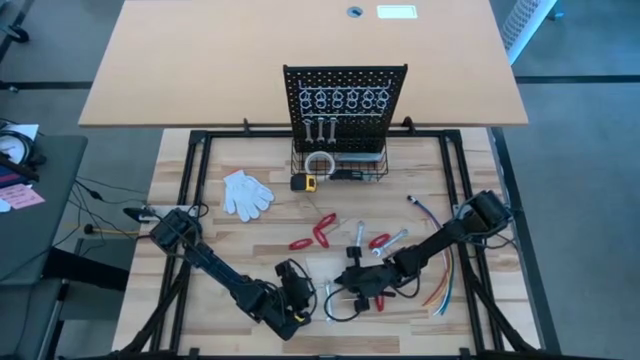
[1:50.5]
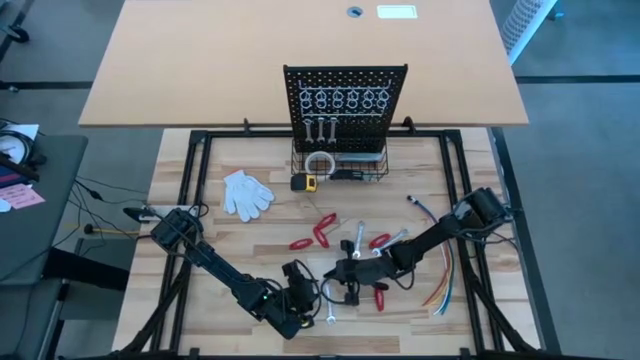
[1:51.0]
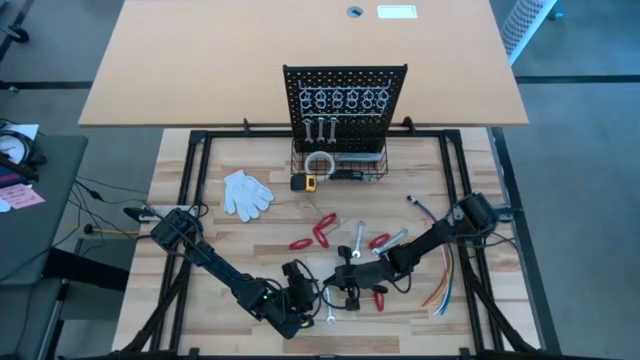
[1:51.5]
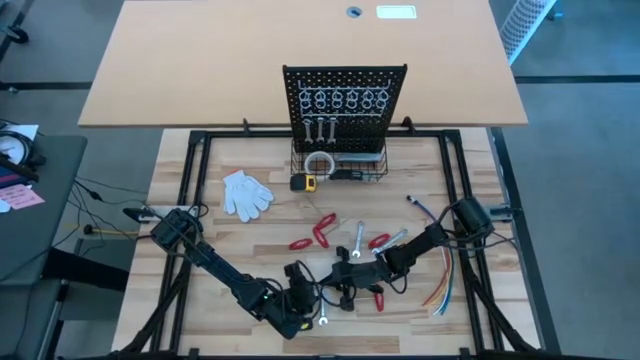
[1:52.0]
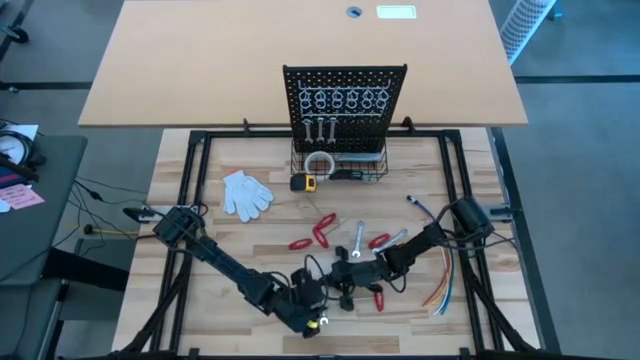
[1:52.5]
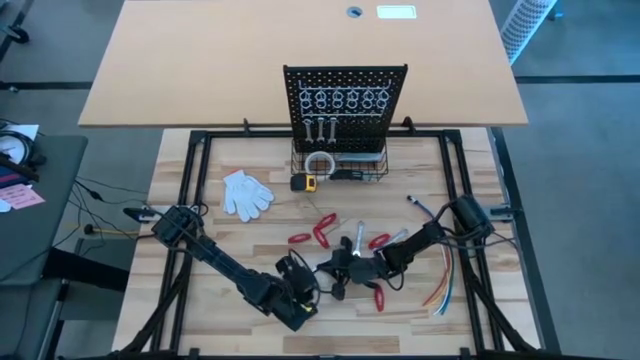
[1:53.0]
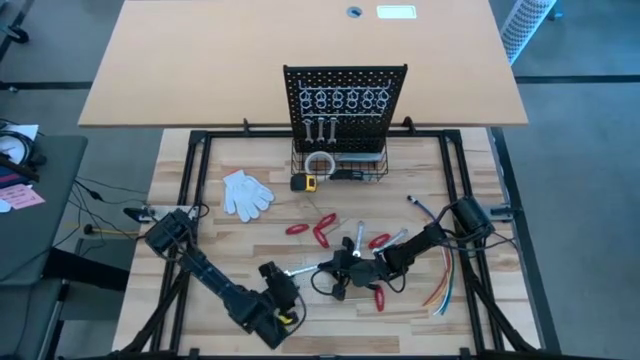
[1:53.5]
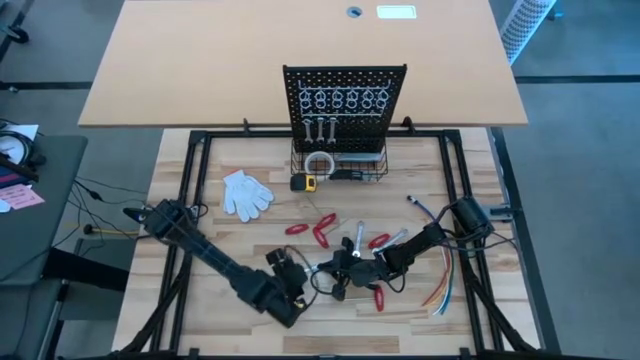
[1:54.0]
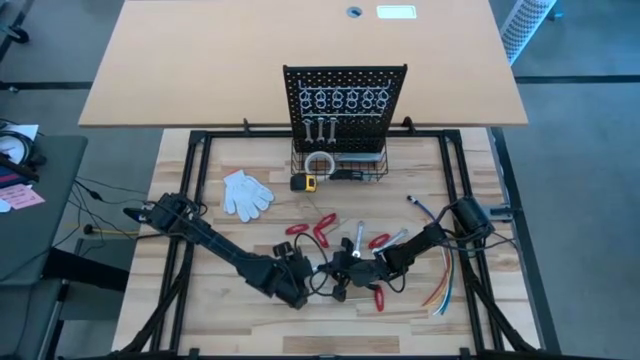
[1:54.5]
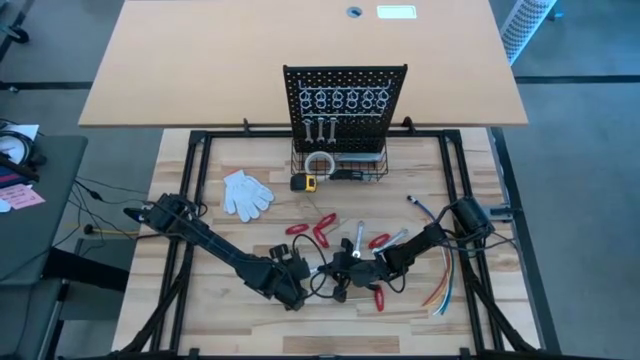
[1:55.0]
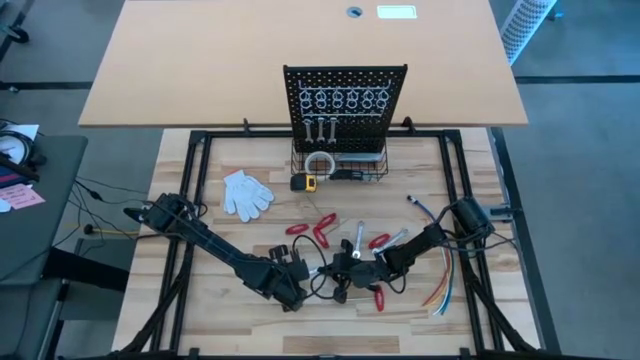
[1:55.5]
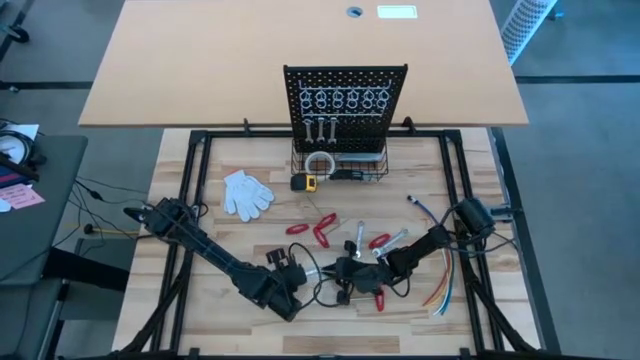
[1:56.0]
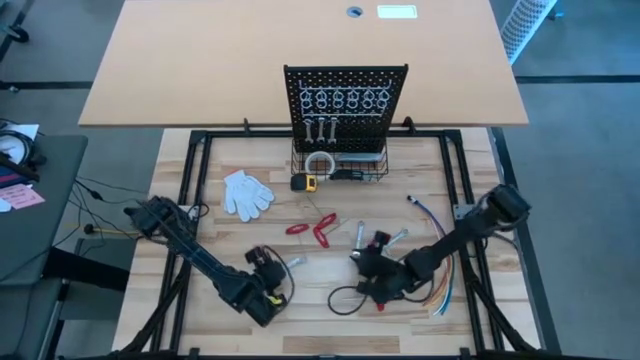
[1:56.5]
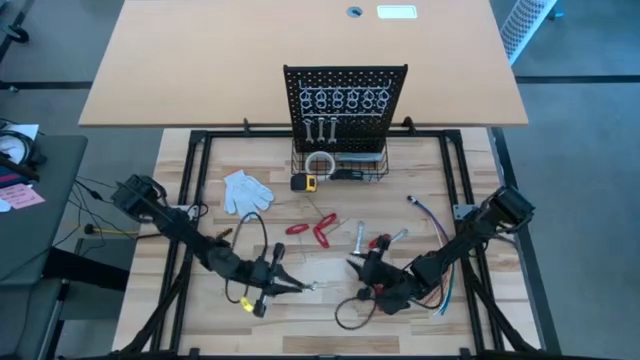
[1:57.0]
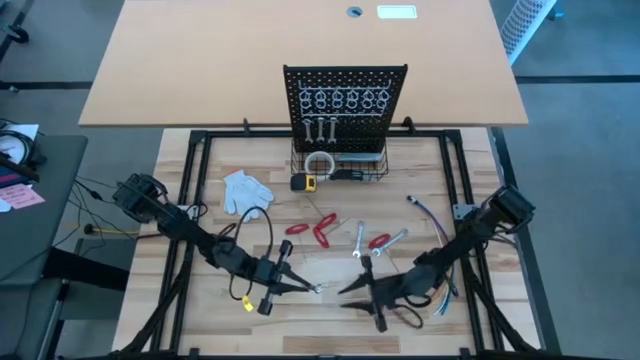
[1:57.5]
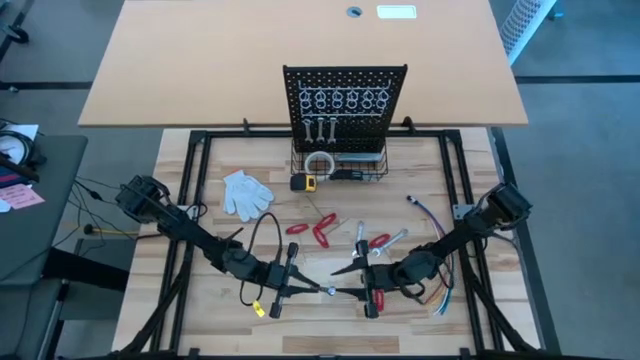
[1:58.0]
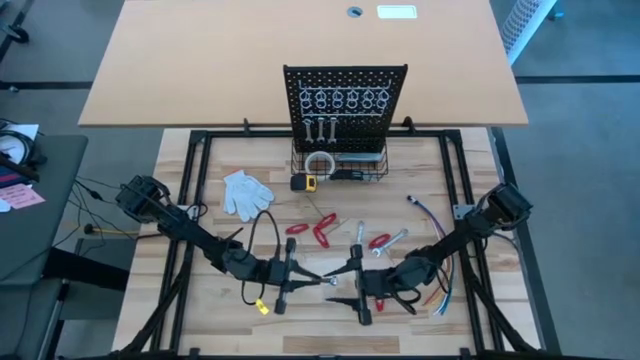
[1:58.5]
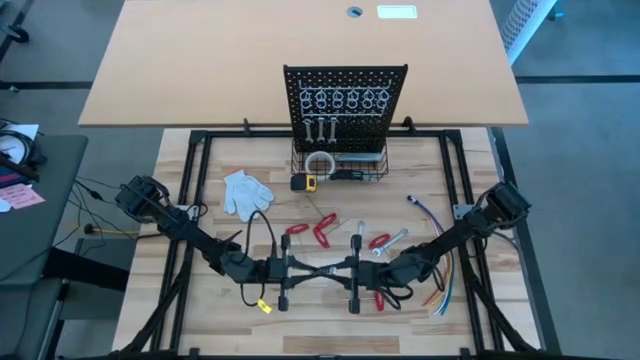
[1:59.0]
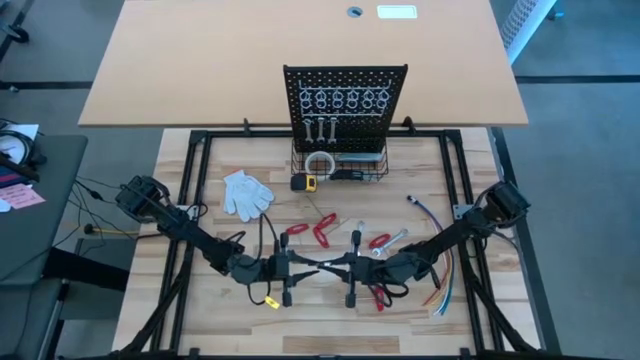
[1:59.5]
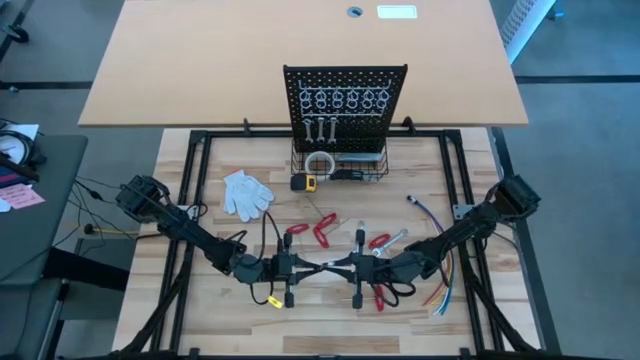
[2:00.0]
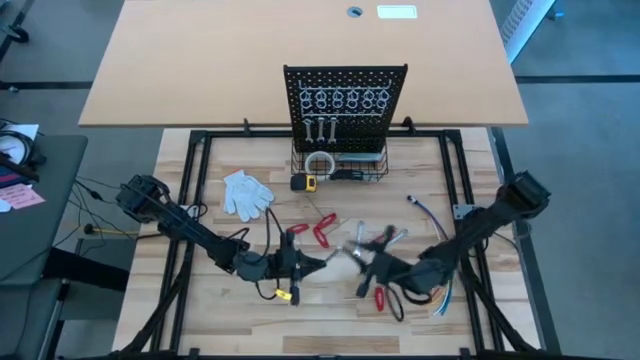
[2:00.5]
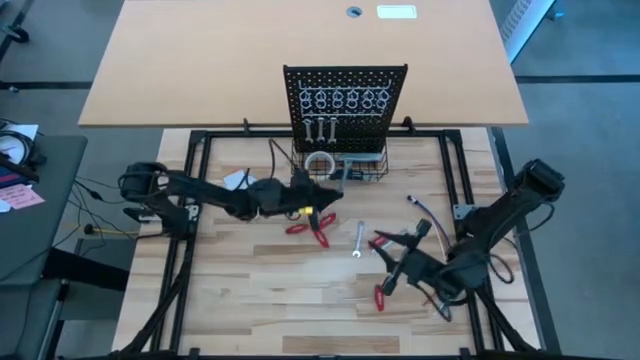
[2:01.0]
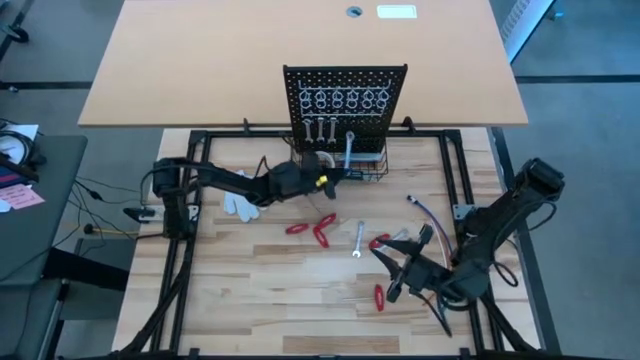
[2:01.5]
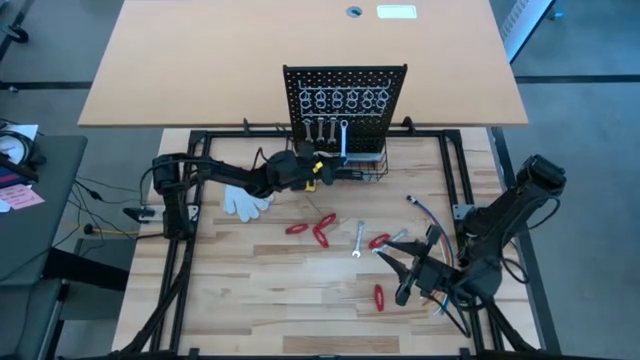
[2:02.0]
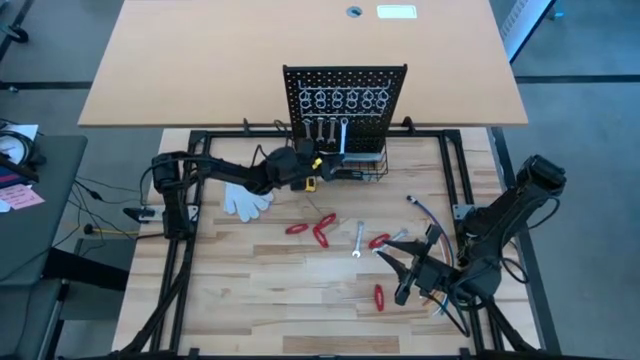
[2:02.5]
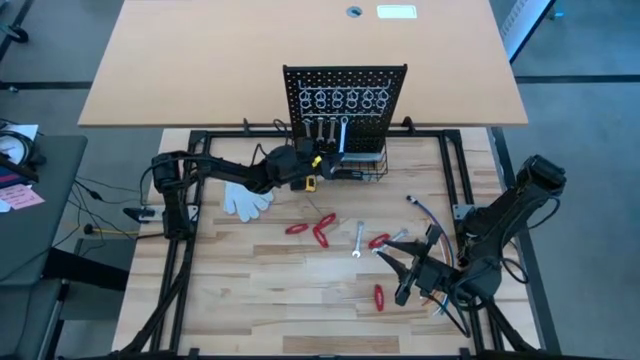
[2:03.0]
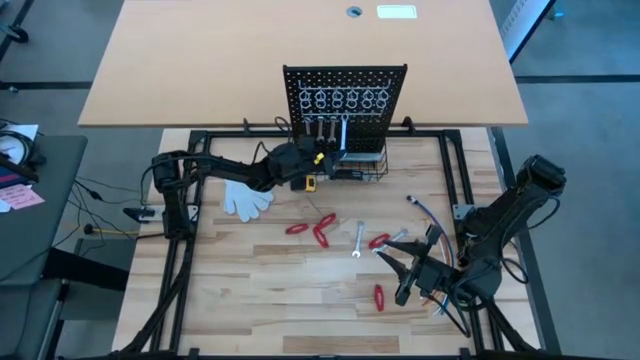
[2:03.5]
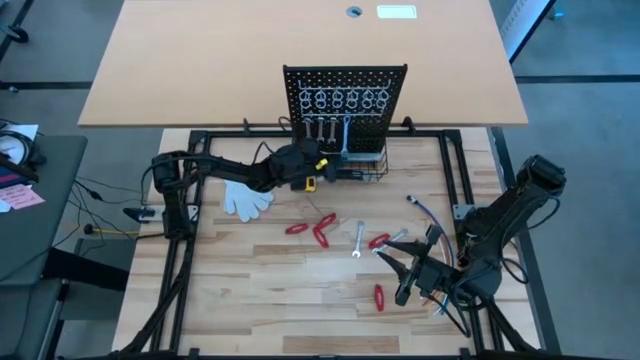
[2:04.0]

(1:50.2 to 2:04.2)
Task: Hang tools onto peg board
Hang the silver wrench on the peg board

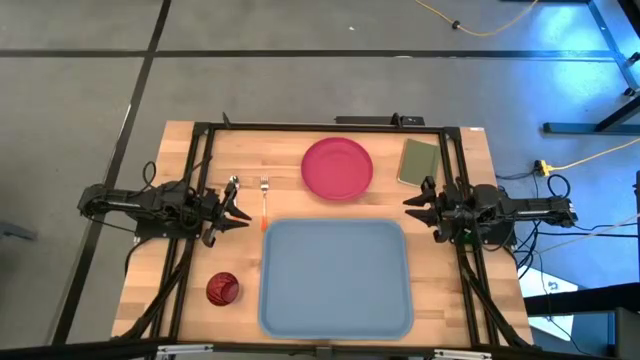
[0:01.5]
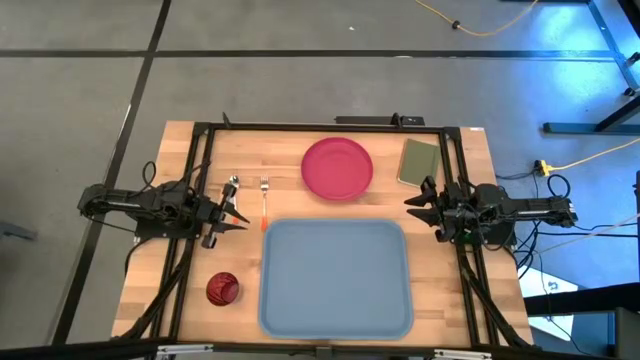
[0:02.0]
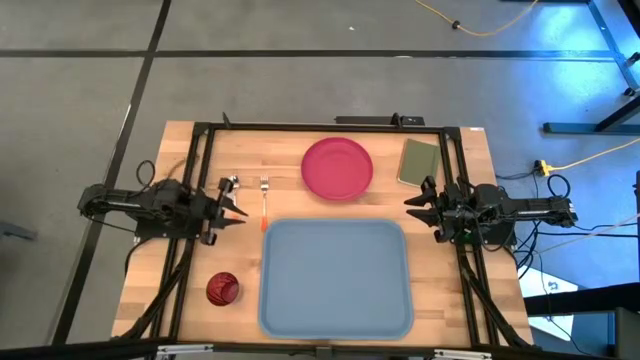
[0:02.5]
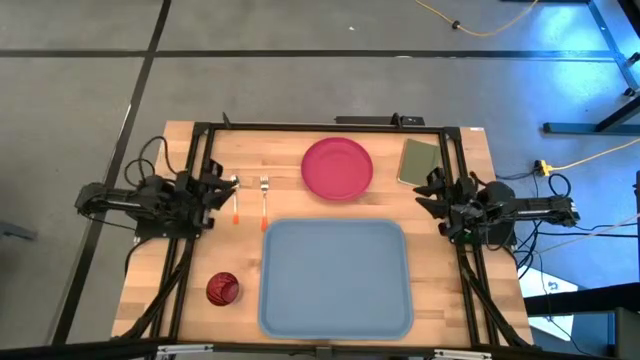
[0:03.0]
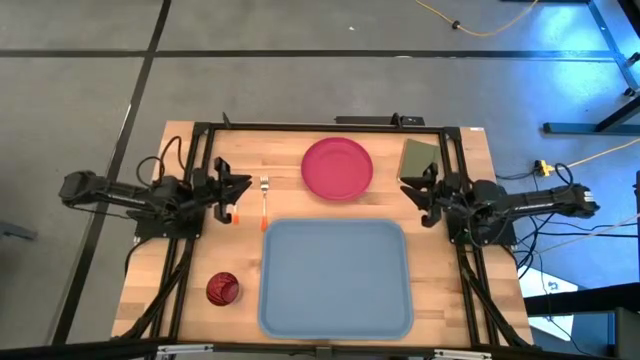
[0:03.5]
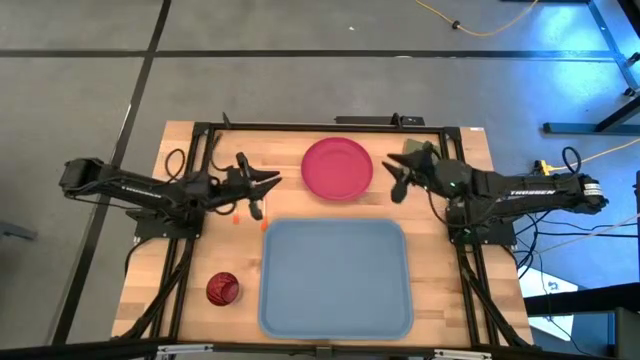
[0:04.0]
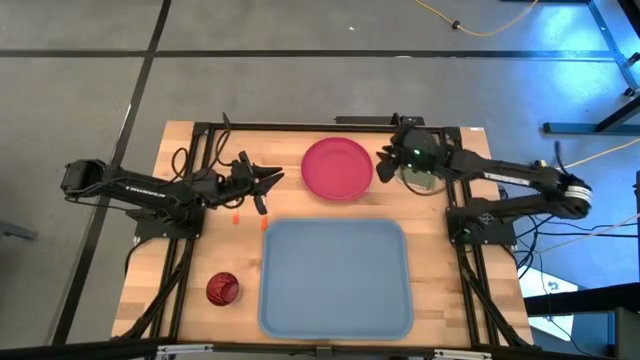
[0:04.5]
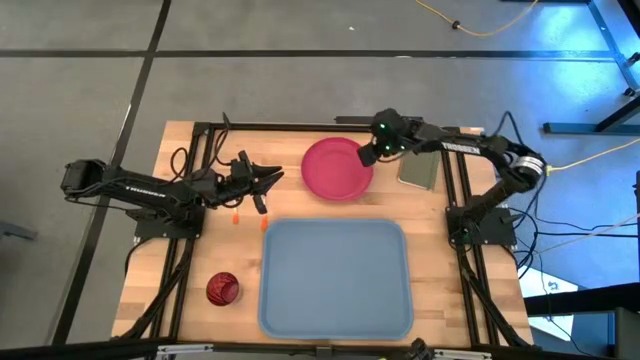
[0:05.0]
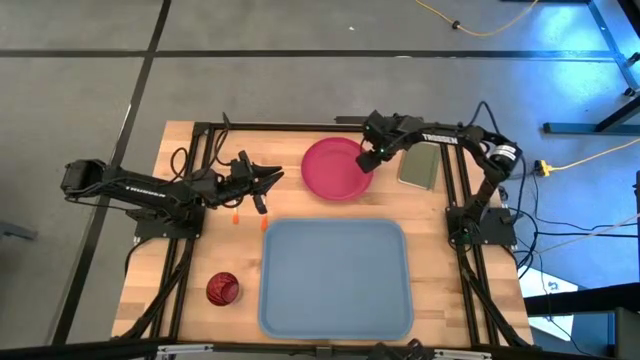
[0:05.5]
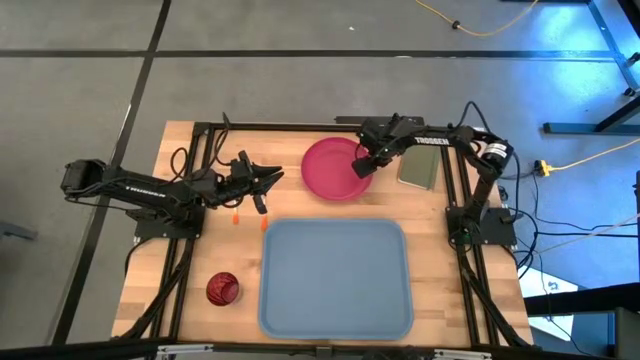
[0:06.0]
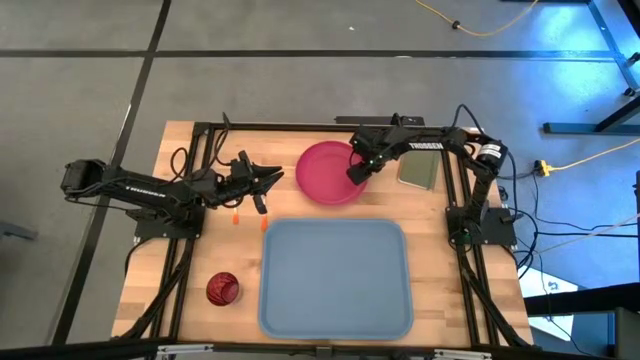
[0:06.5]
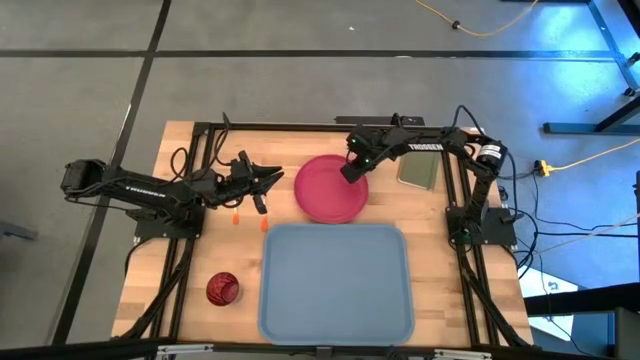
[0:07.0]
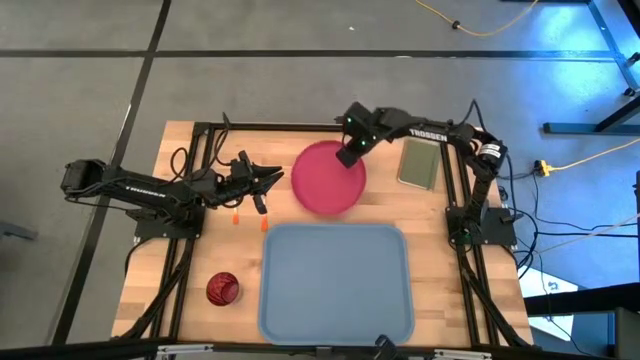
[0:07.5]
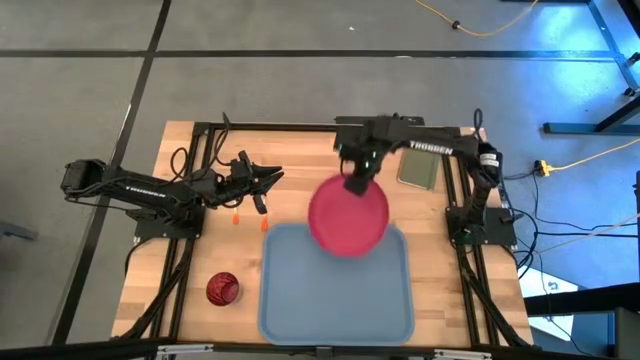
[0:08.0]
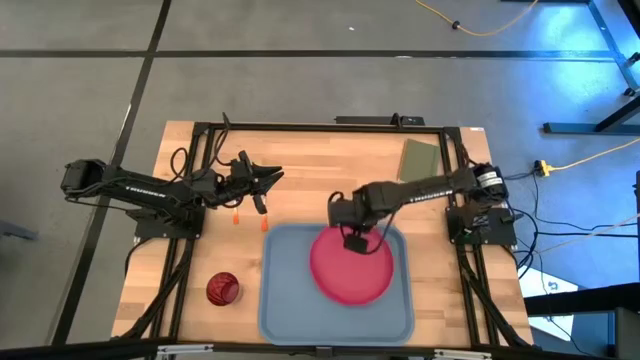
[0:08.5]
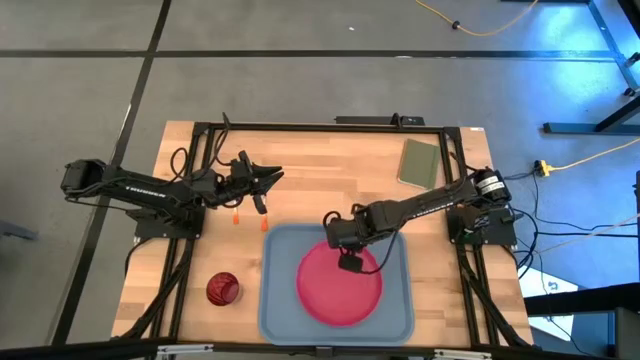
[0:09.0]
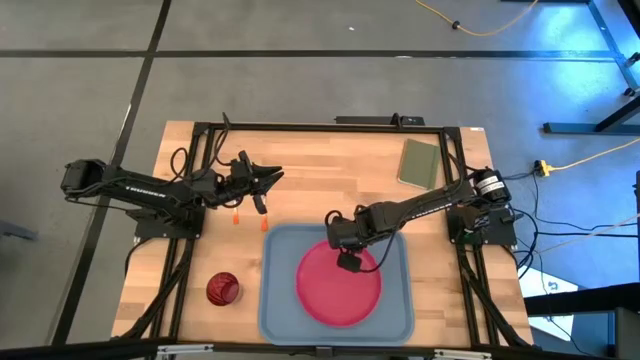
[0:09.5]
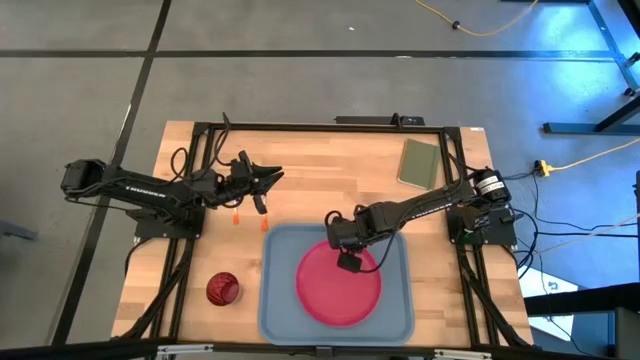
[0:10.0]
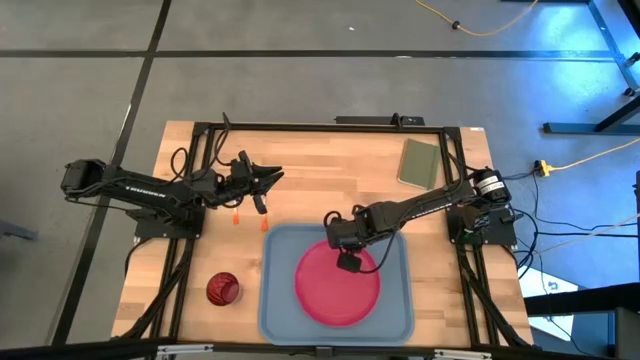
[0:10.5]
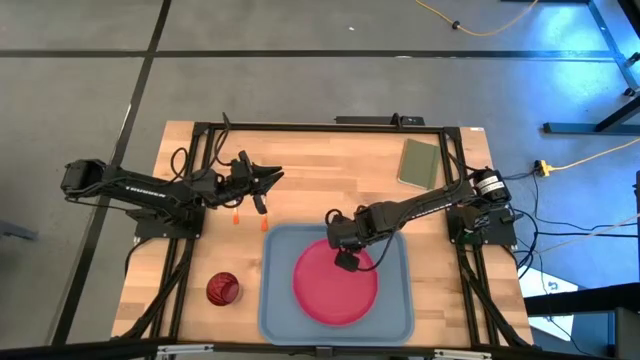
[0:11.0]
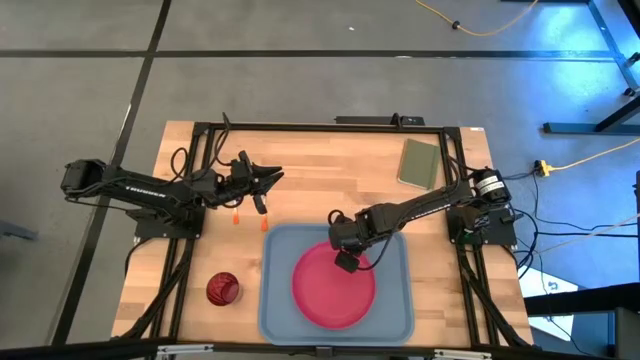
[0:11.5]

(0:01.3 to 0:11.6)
Task: Pick and place plate/cup/fork/spoon on tray
Put the pink plate on the blue tray
